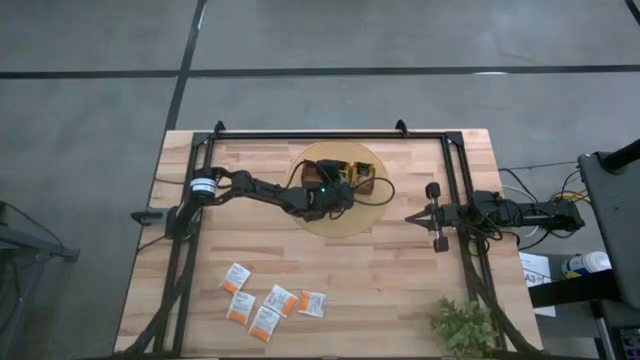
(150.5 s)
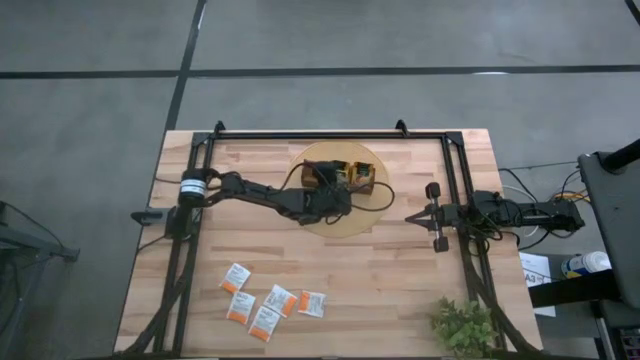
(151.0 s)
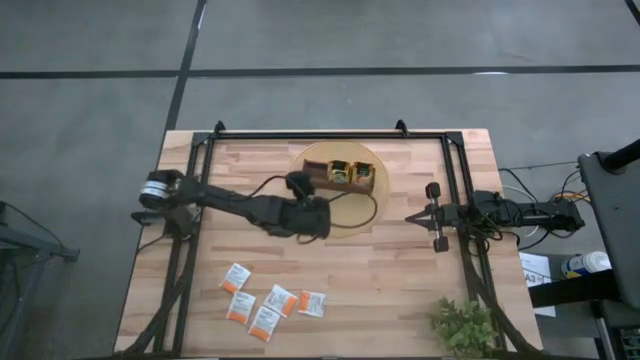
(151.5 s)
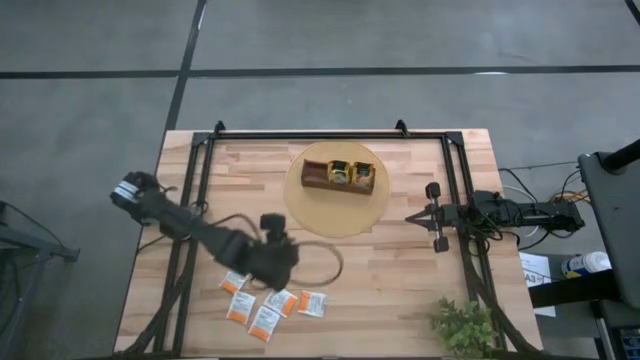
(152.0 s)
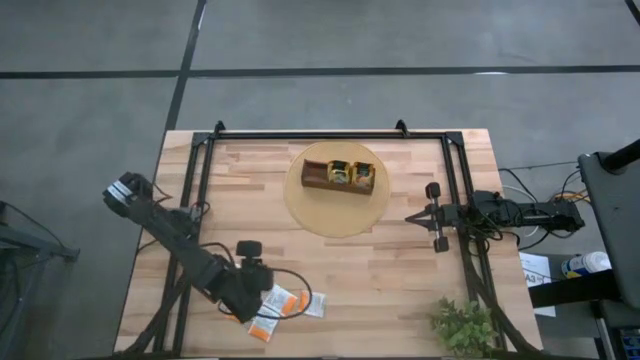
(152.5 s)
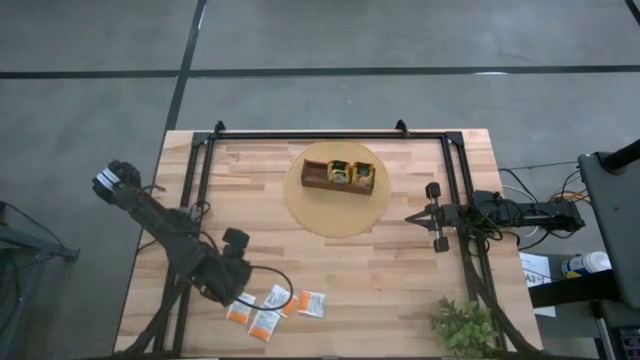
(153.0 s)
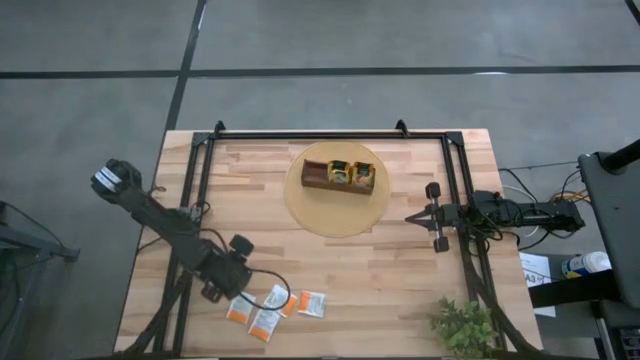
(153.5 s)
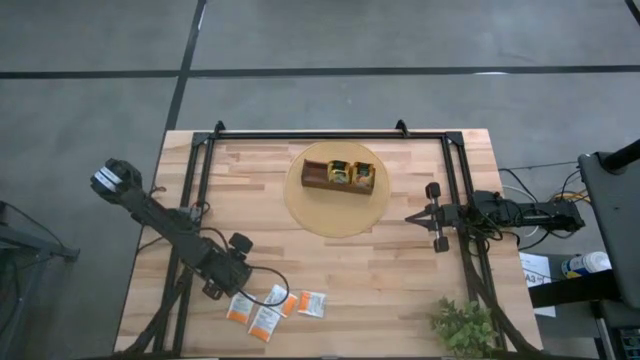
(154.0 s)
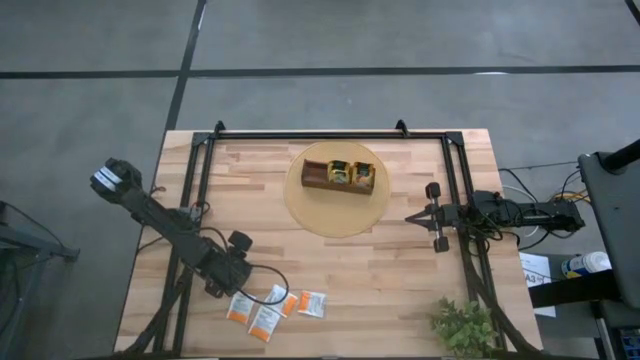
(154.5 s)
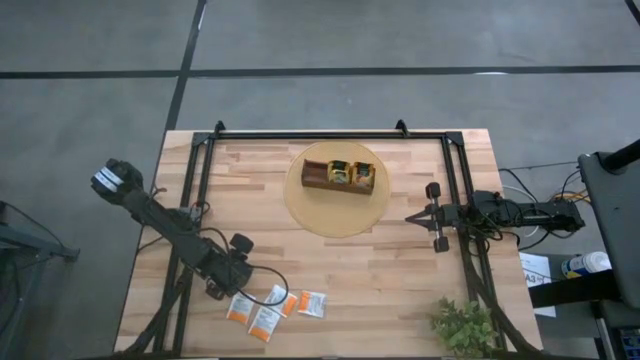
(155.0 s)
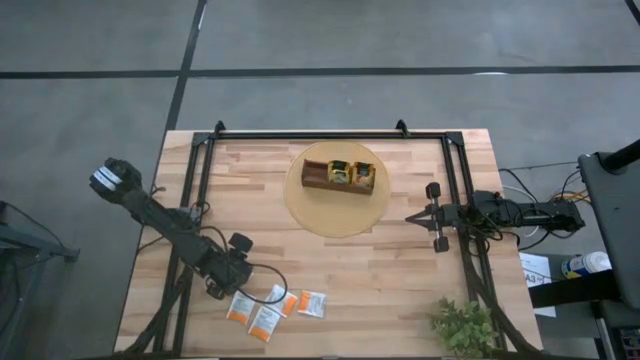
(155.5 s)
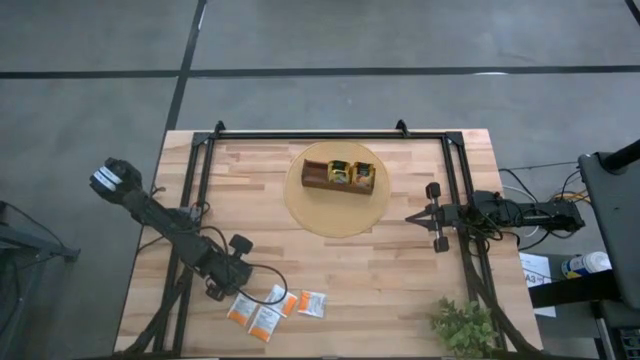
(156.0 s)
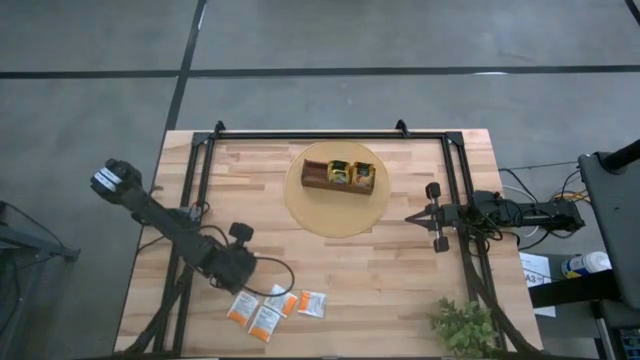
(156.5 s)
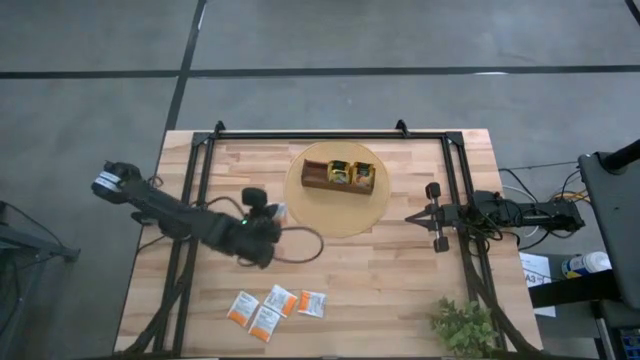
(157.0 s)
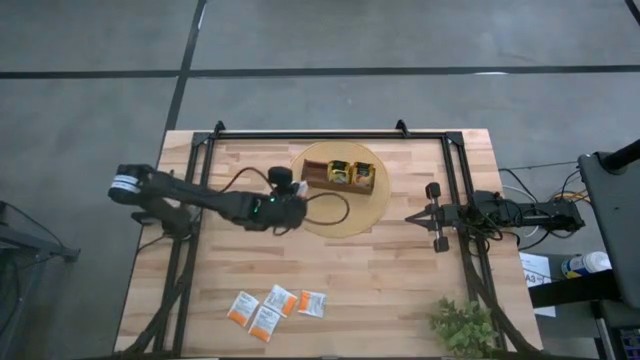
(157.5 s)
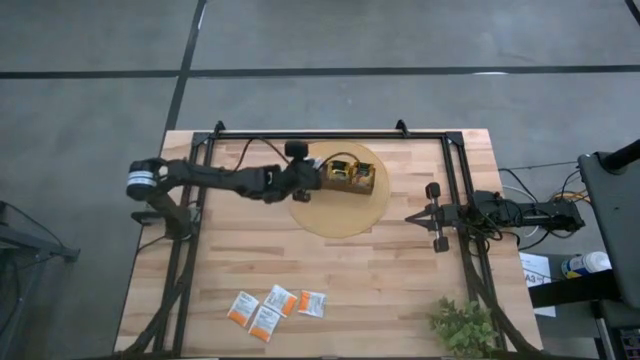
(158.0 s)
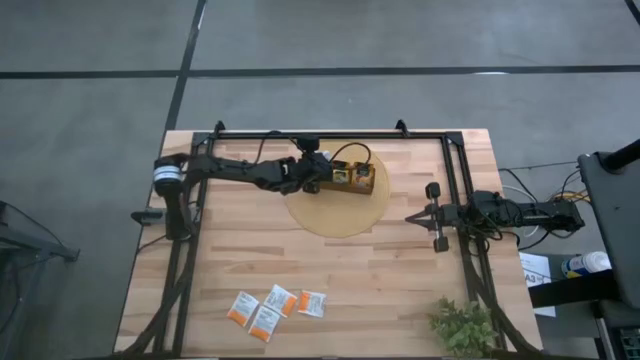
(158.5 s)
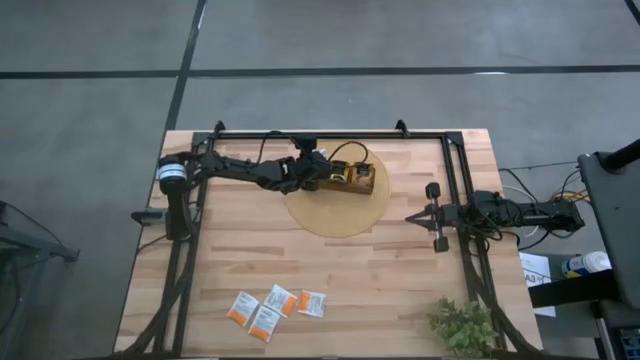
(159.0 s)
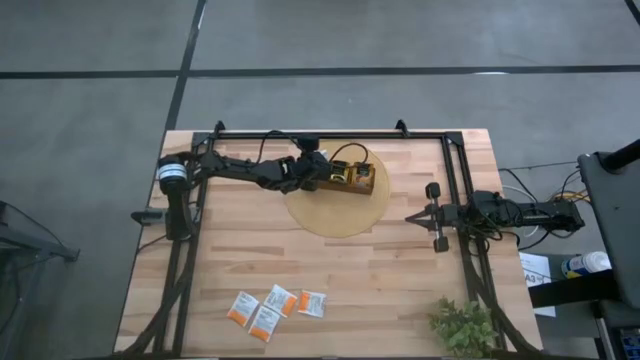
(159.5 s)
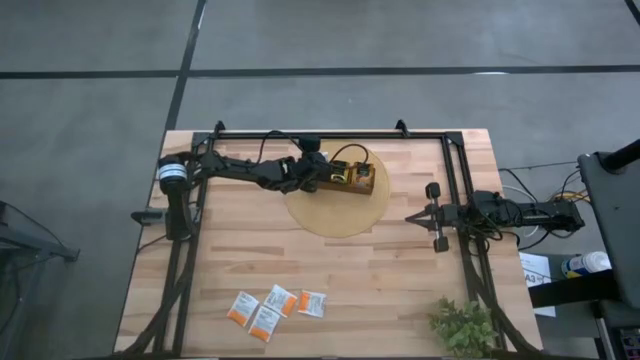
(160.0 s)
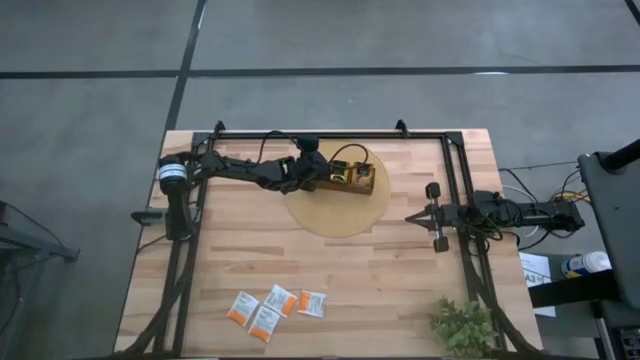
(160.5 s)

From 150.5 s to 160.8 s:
Task: Pick & Place Tea
Put the white tea bag into the left section of wooden organizer

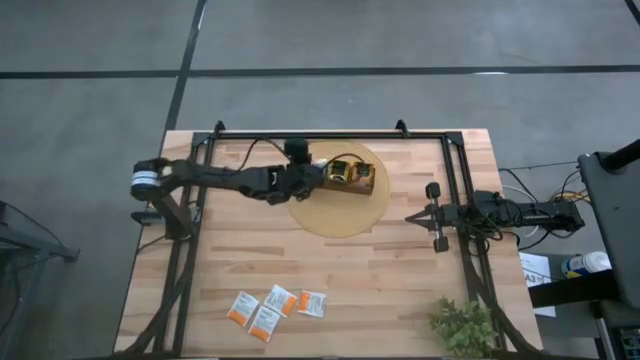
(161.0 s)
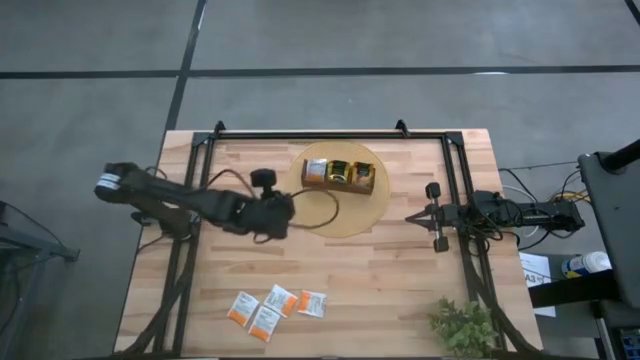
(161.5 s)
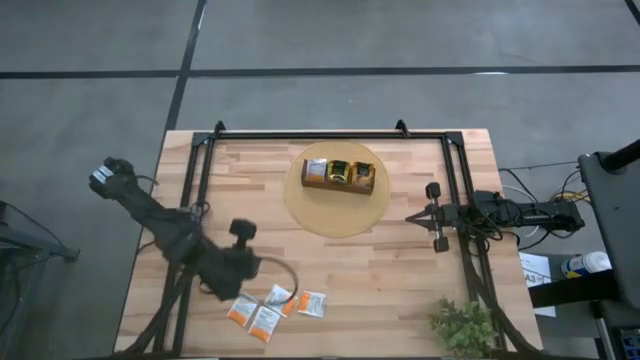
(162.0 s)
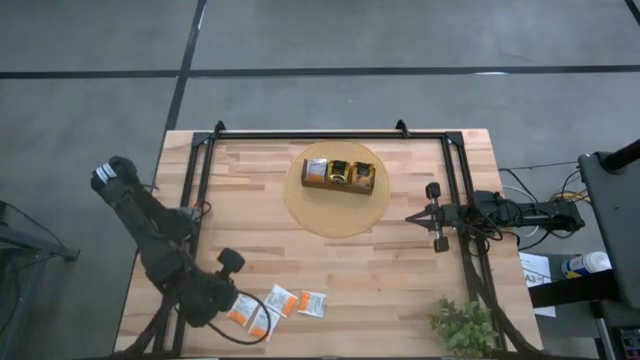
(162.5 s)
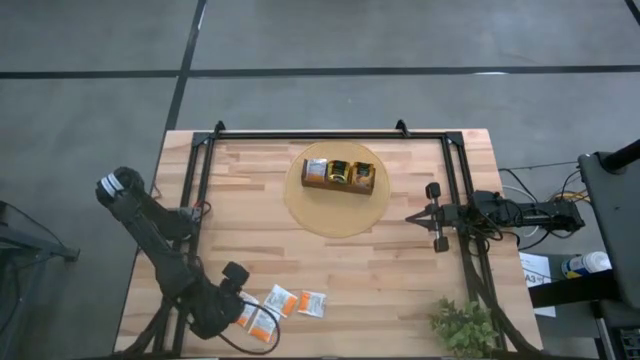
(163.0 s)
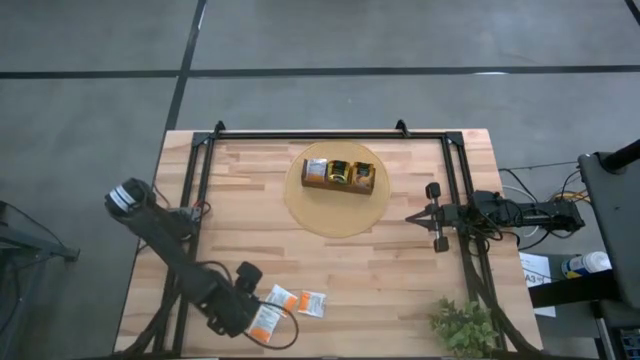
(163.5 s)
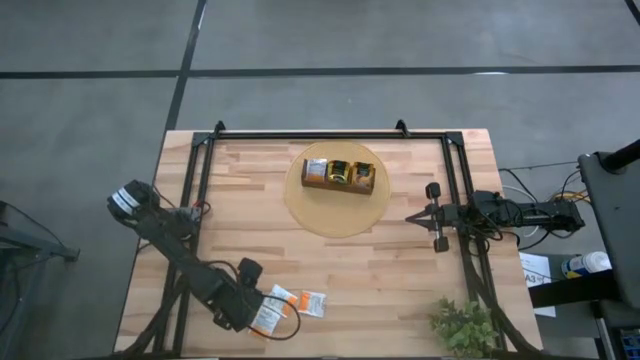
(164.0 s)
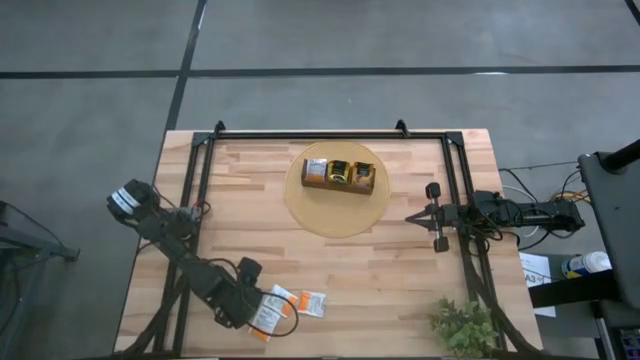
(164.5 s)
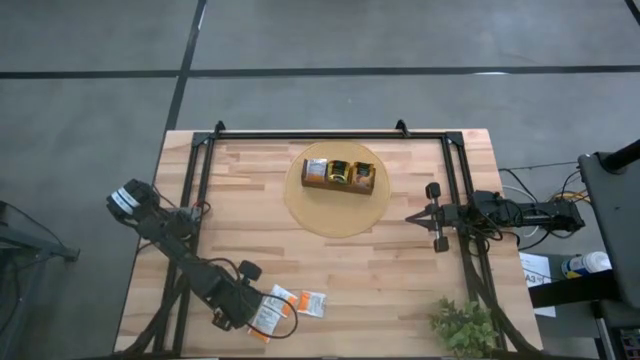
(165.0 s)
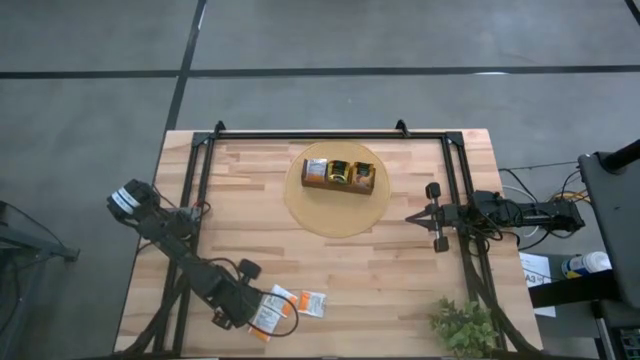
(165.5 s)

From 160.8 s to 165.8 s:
Put the white tea bag into the left section of wooden organizer

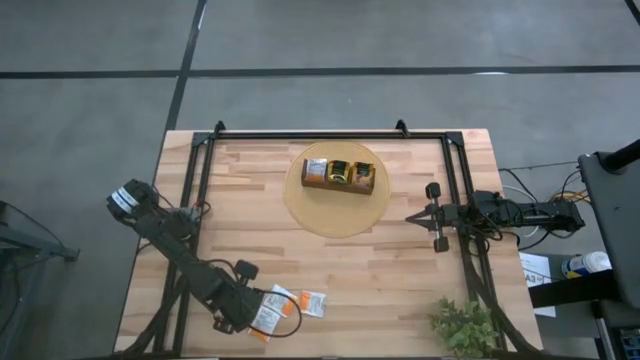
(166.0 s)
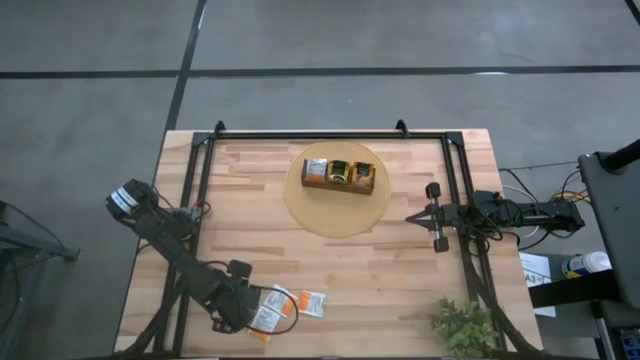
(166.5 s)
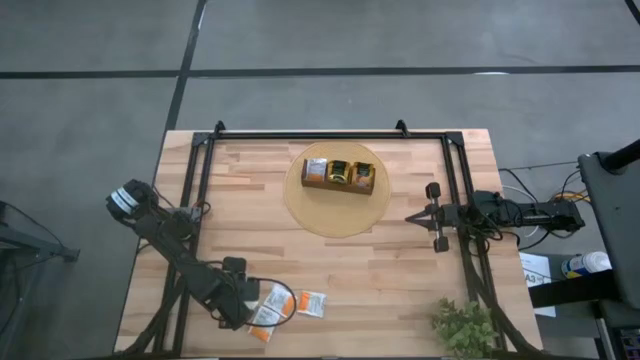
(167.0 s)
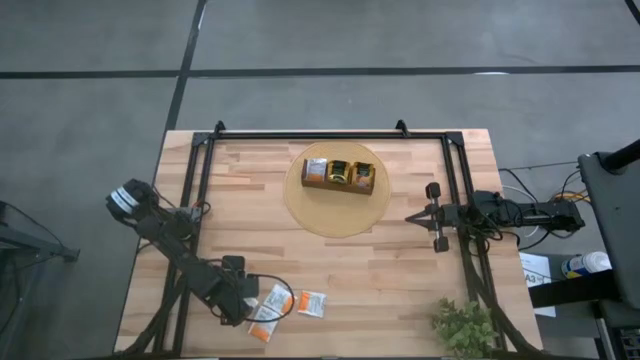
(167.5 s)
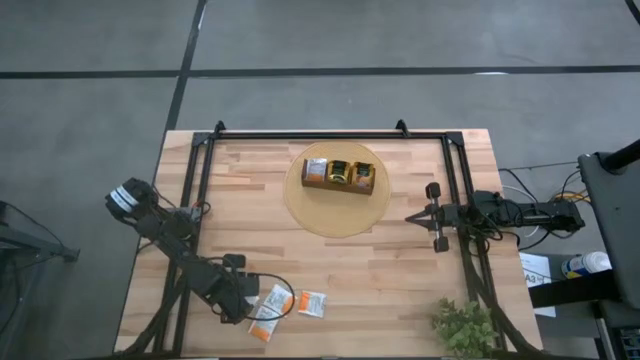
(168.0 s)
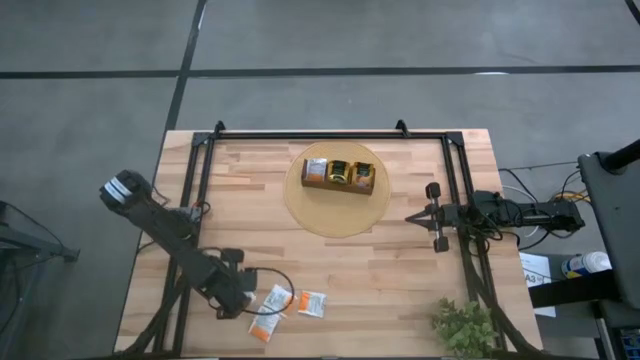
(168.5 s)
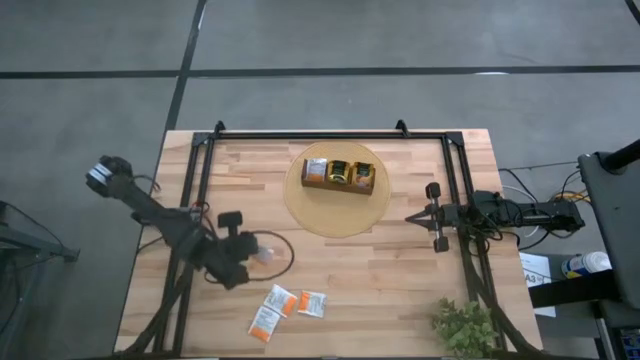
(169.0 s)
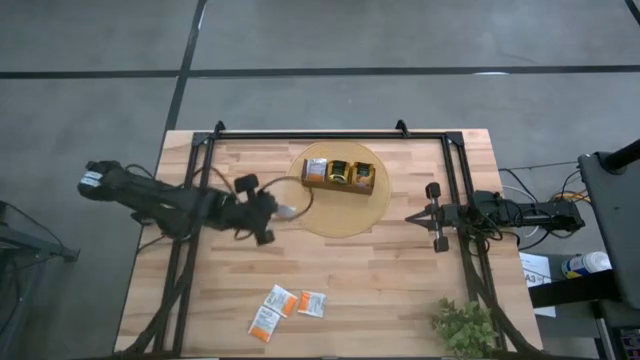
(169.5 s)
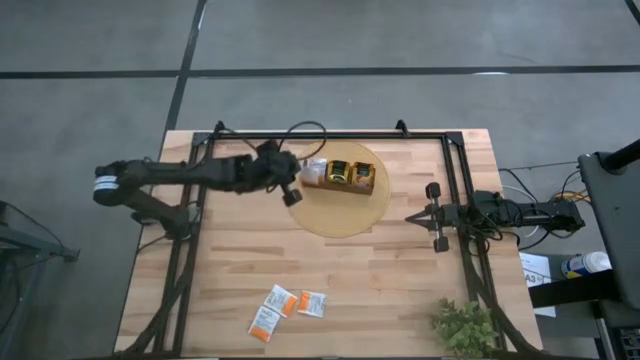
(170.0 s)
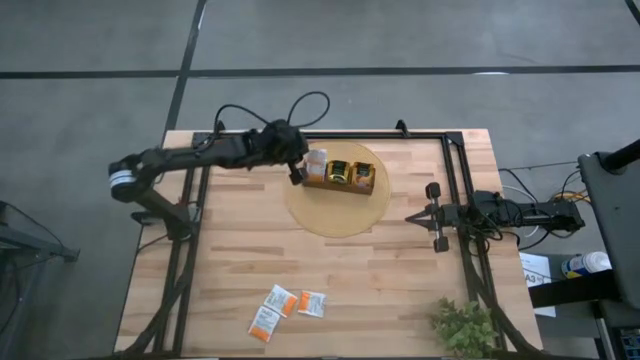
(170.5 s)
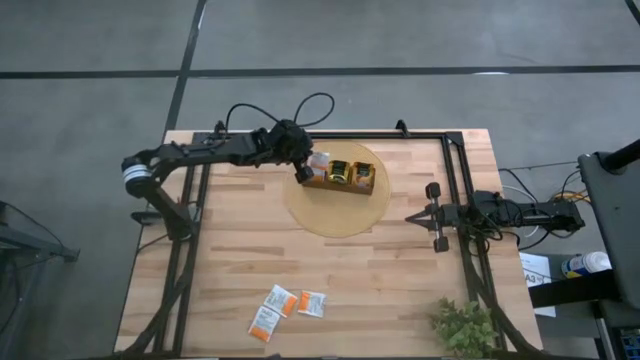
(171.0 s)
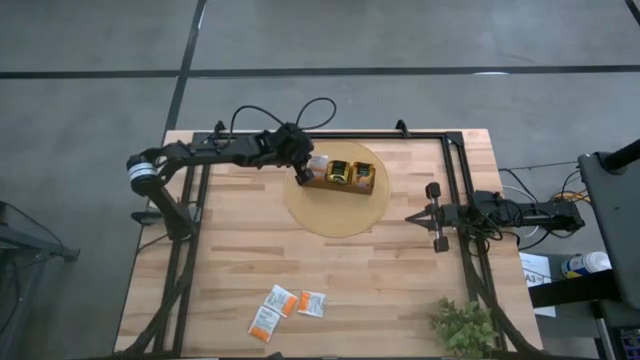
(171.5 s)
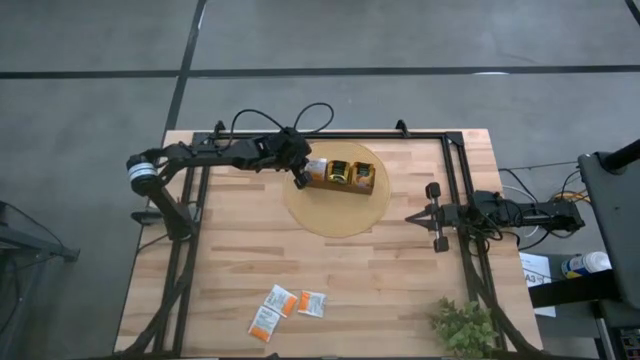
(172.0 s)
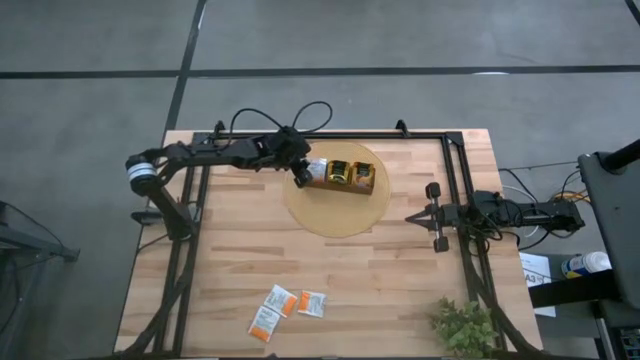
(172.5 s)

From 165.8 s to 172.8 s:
Put the white tea bag into the left section of wooden organizer
